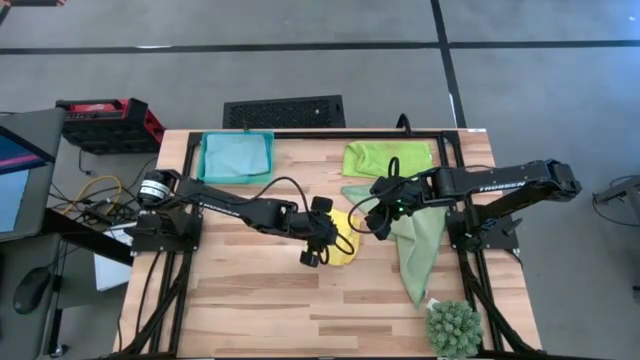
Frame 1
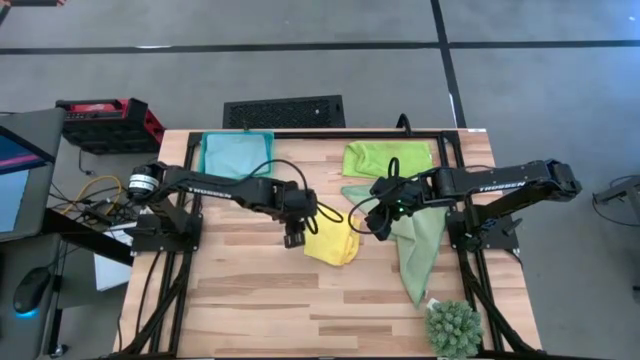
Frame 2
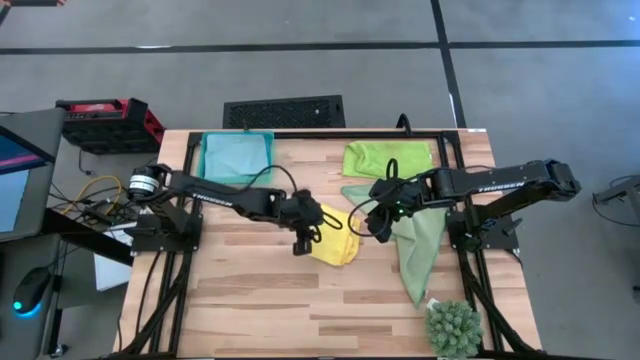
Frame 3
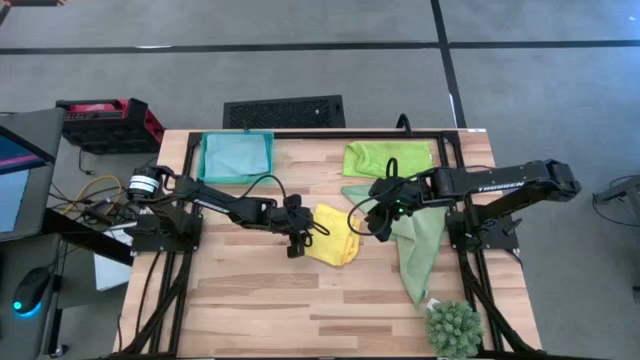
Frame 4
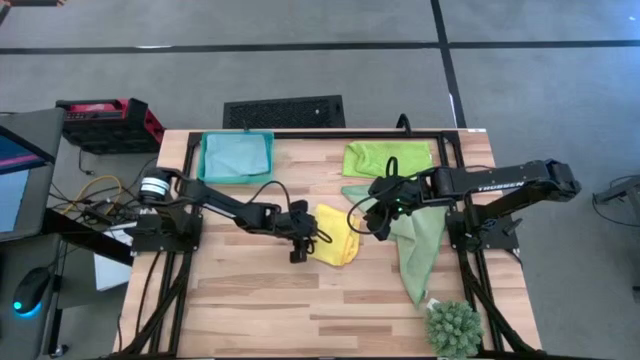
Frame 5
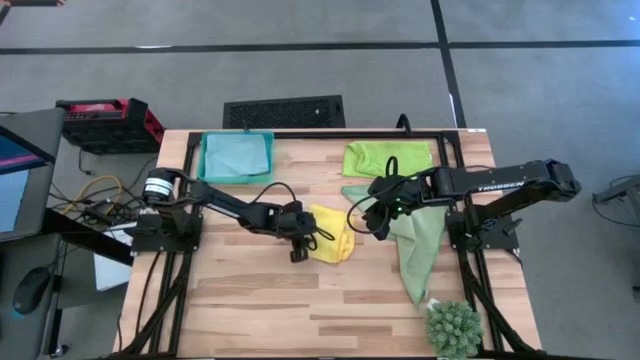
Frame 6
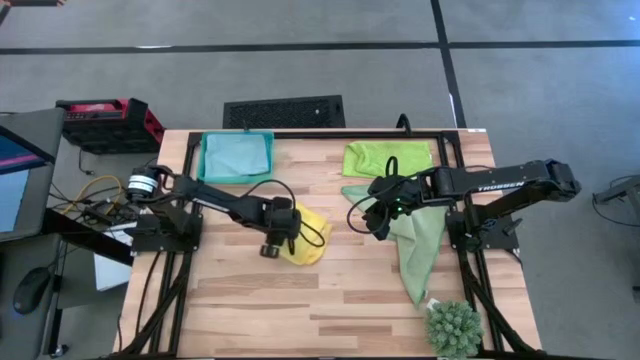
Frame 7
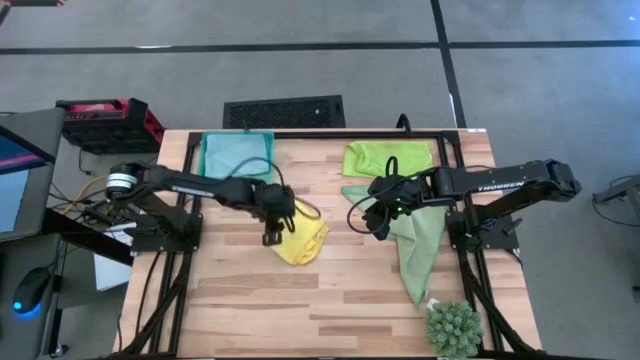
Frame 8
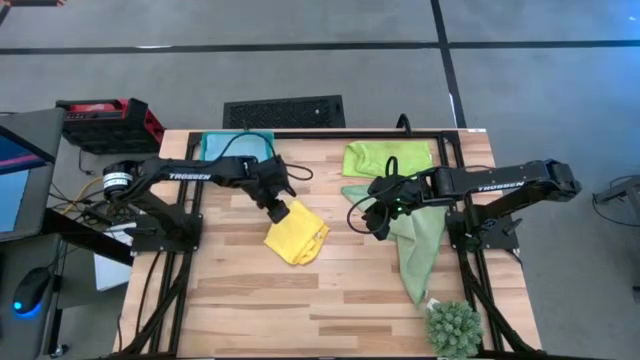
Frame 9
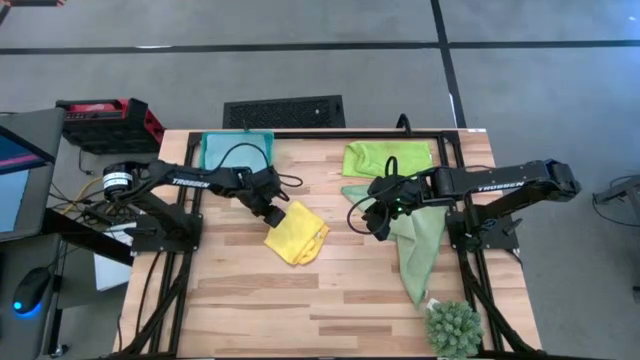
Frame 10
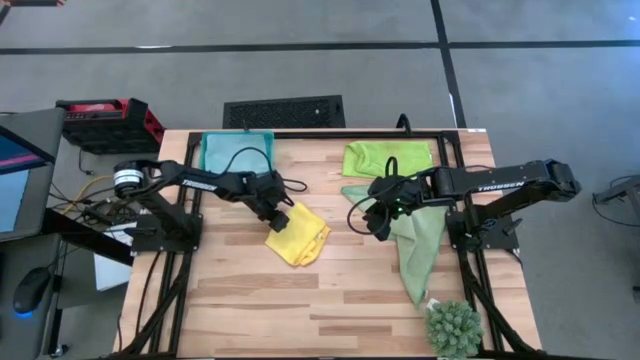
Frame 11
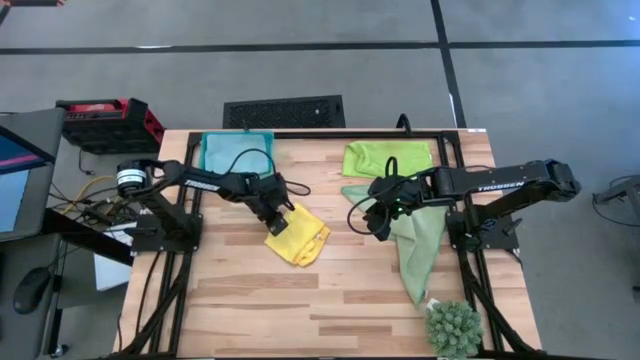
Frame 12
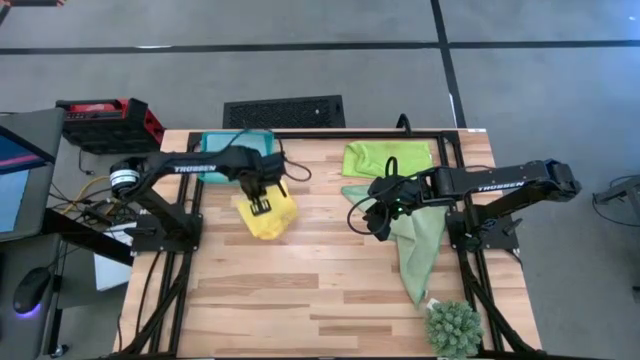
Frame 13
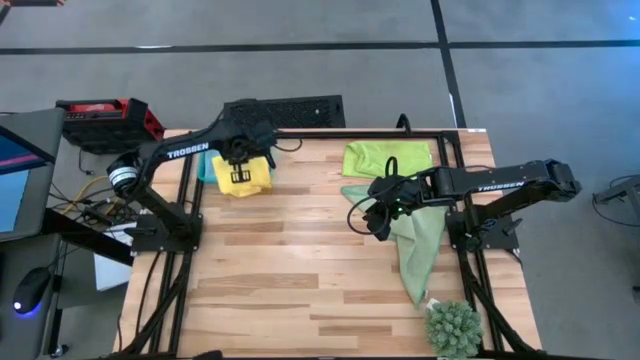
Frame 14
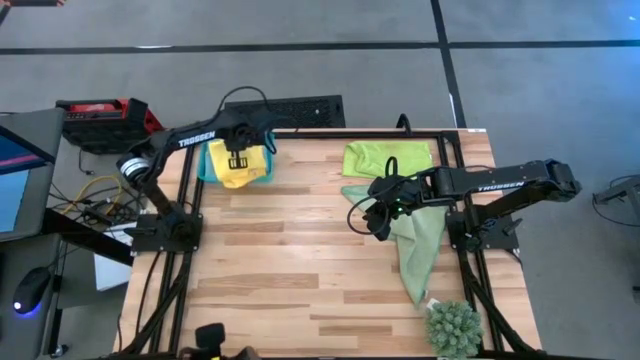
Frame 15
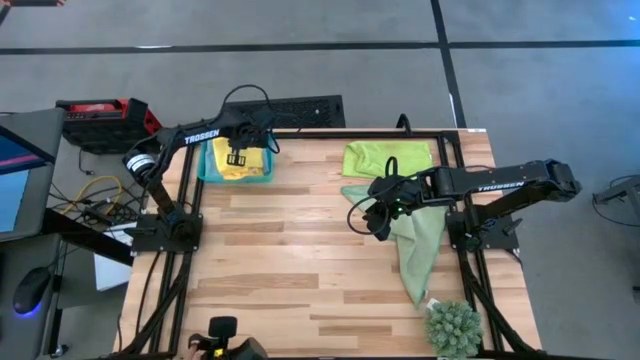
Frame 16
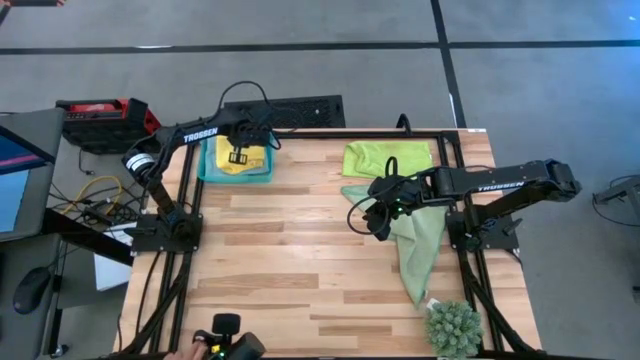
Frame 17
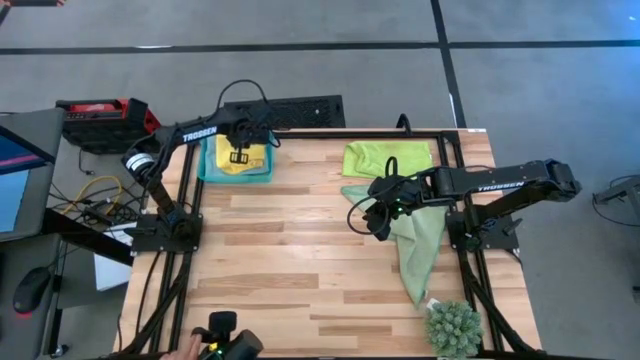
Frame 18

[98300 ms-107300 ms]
Task: Fold microfiber towels
Stack the folded yellow microfiber on top of the blue microfiber towel

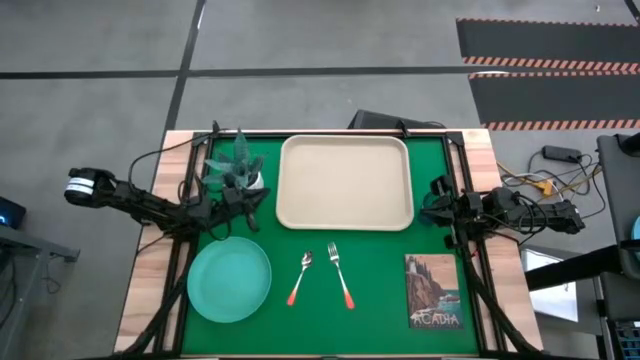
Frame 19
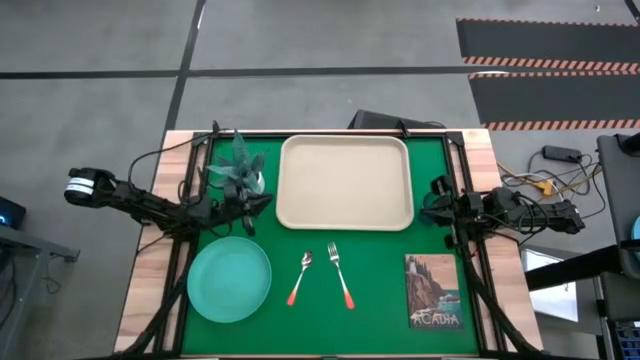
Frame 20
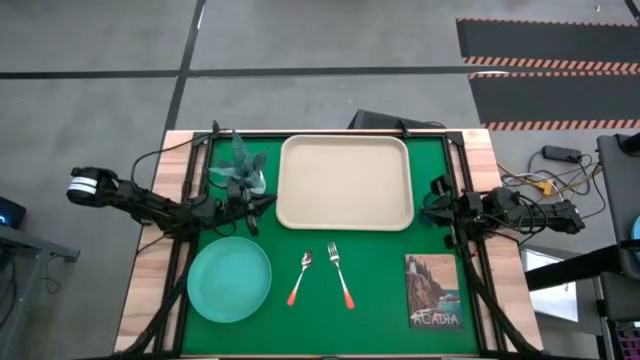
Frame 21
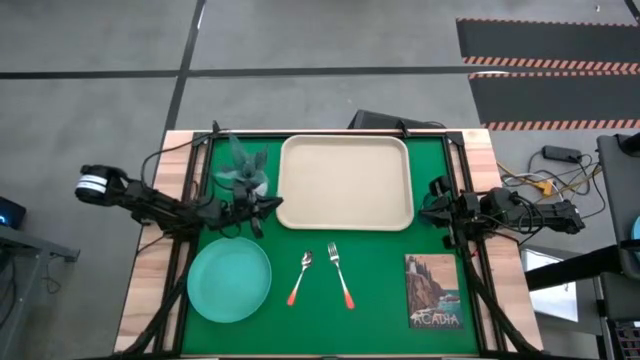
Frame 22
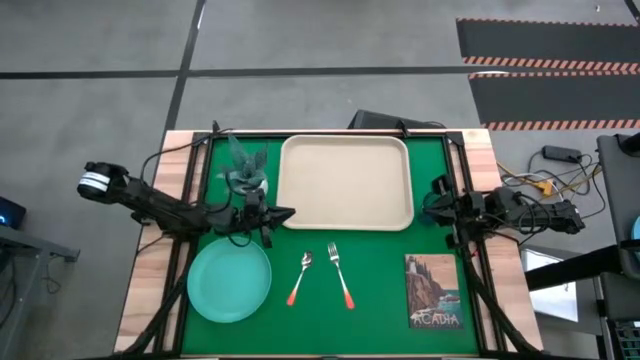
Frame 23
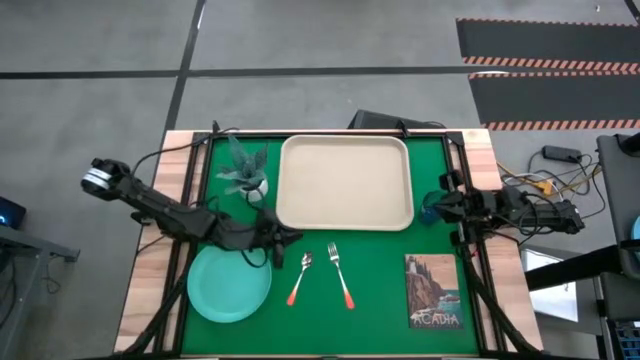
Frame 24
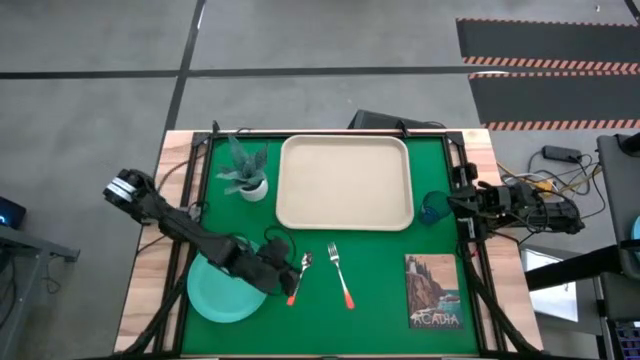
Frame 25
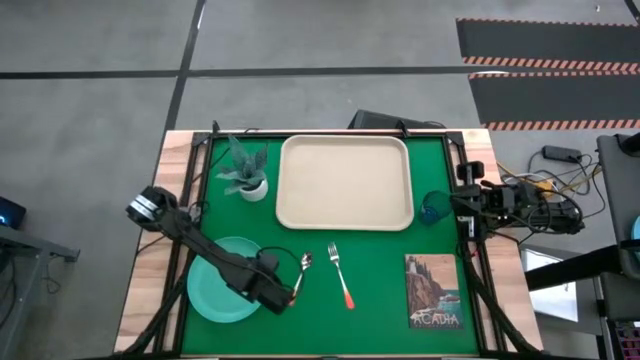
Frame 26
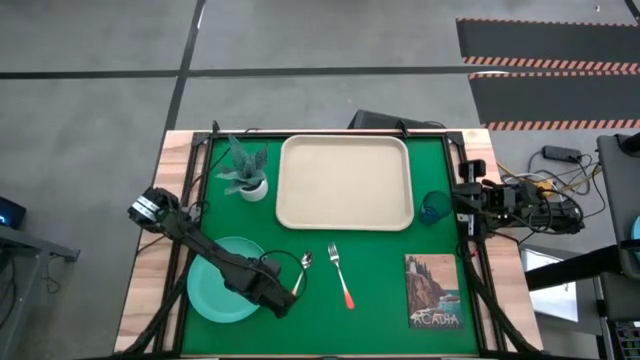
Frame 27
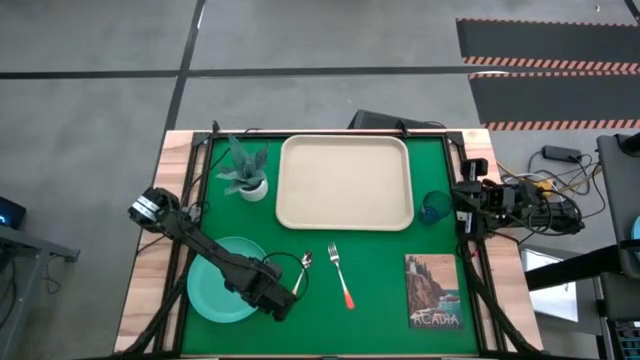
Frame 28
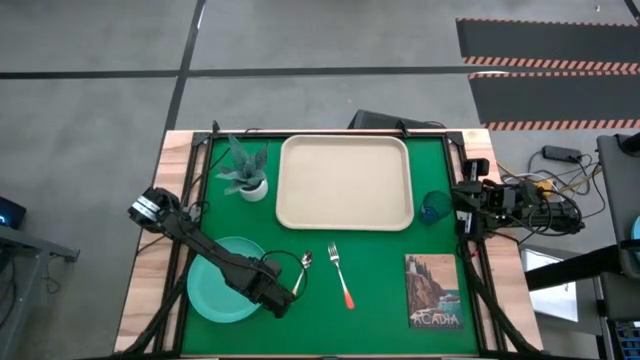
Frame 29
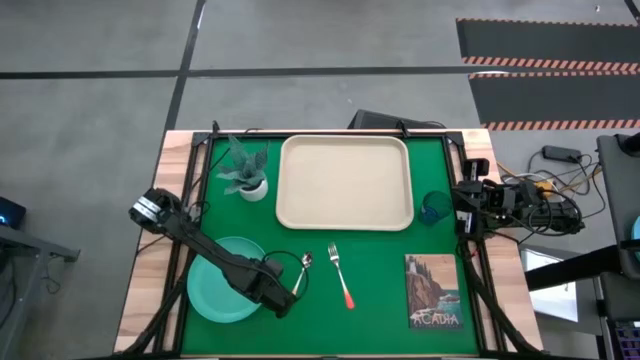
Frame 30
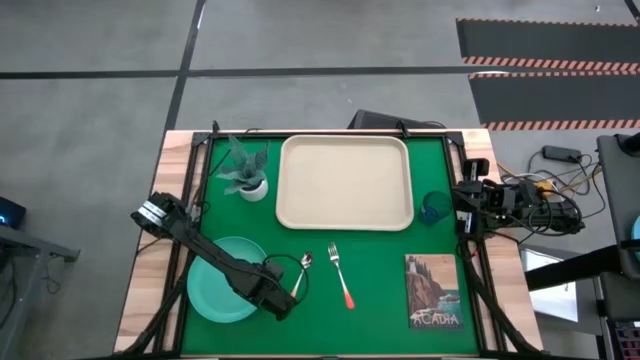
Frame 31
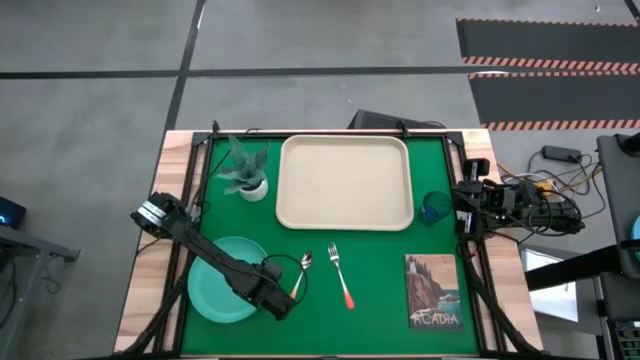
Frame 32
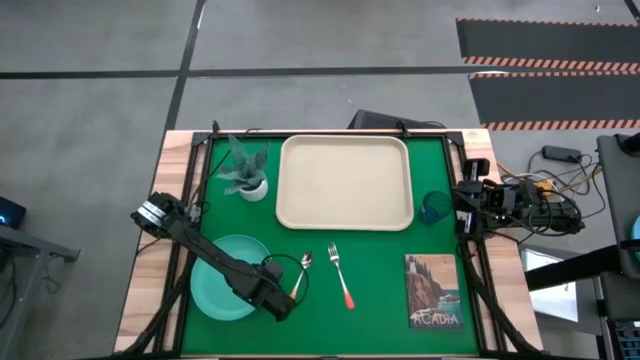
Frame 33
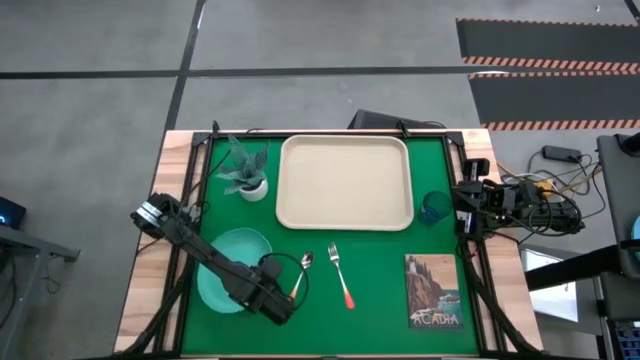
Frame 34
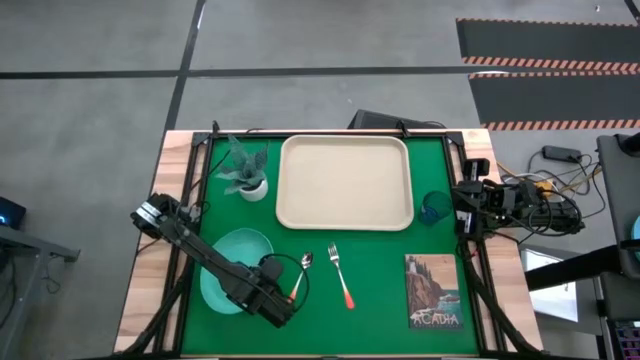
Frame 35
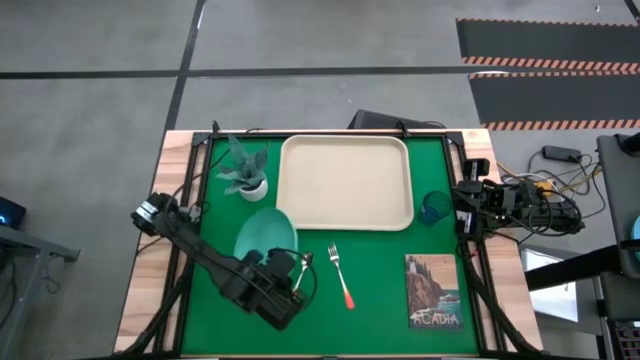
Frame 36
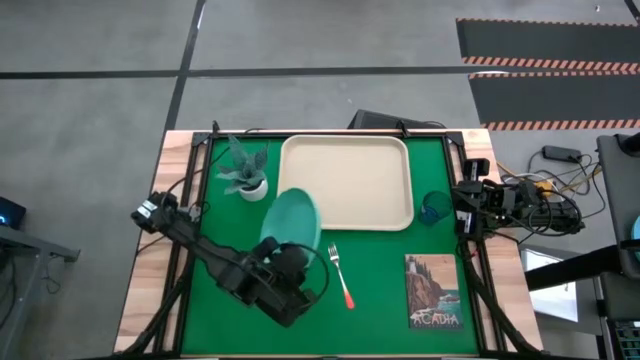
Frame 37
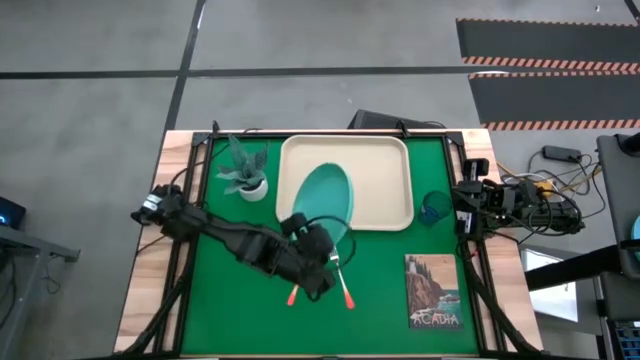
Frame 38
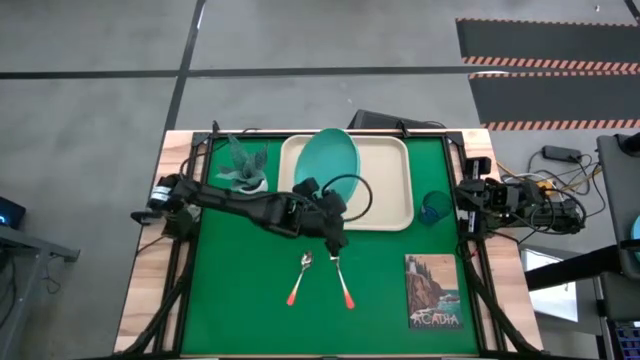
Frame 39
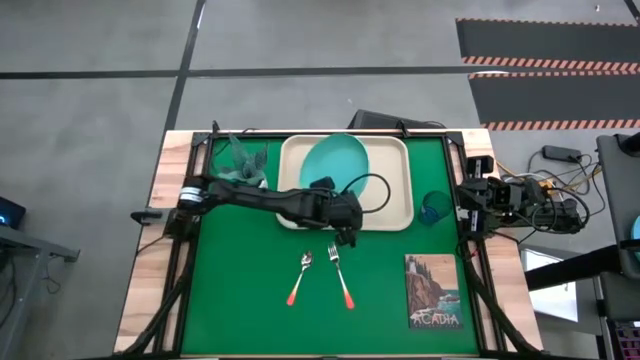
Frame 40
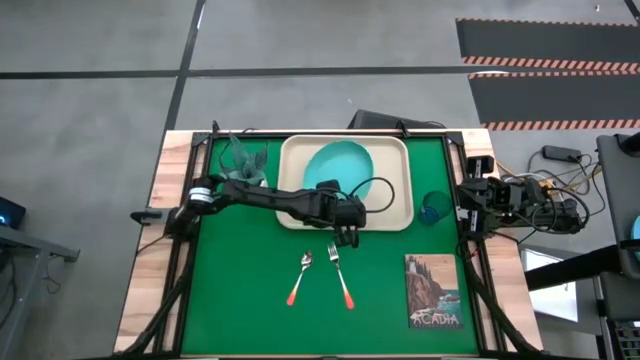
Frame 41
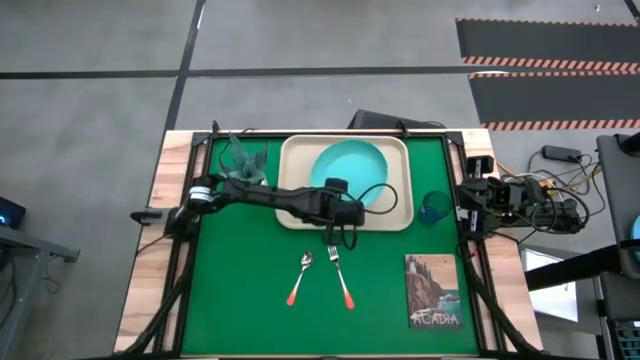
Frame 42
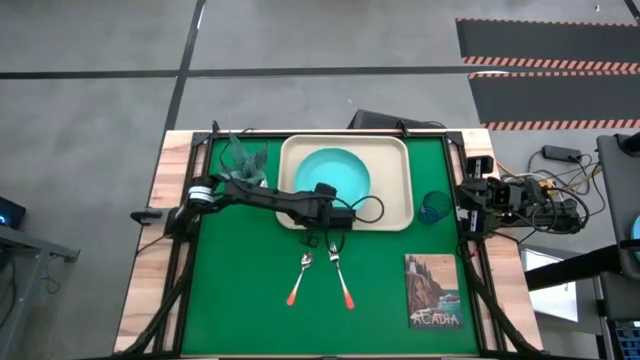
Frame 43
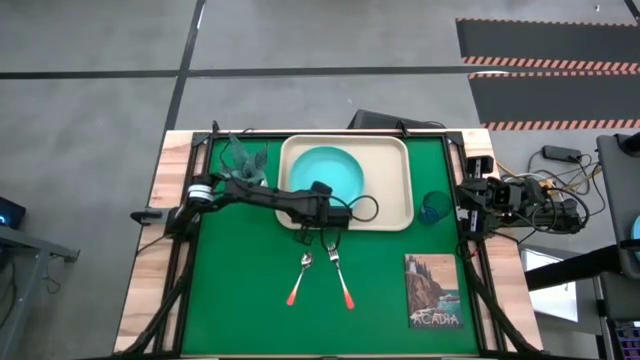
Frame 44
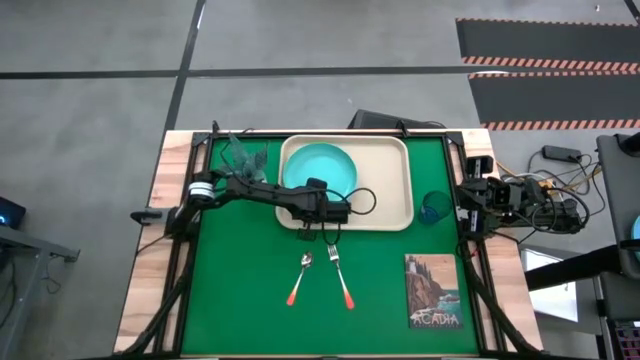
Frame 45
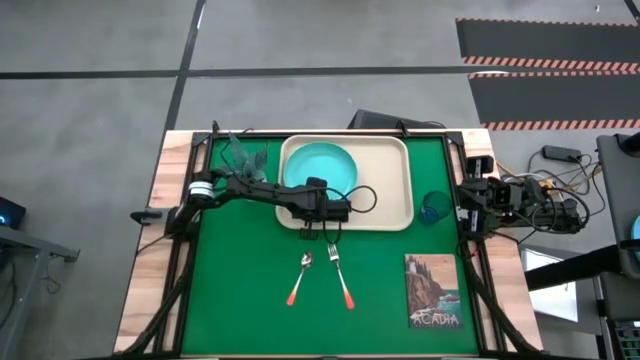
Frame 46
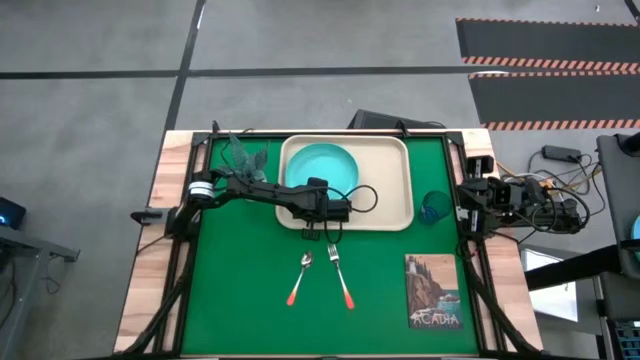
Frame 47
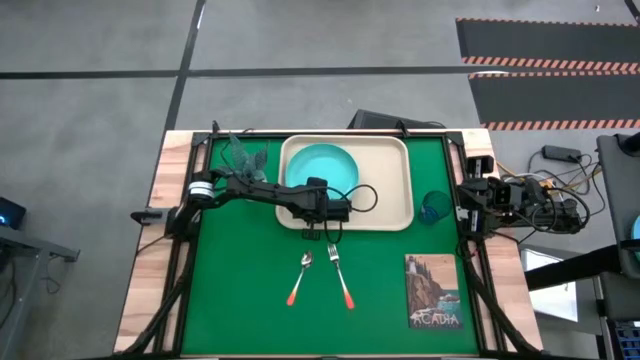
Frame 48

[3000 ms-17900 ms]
Task: Pick and place plate/cup/fork/spoon on tray
Put the light blue plate on the light white tray
